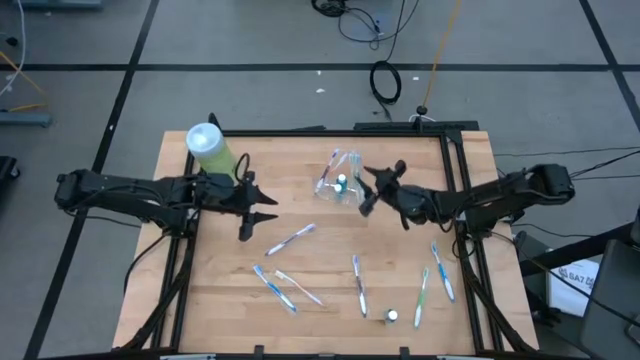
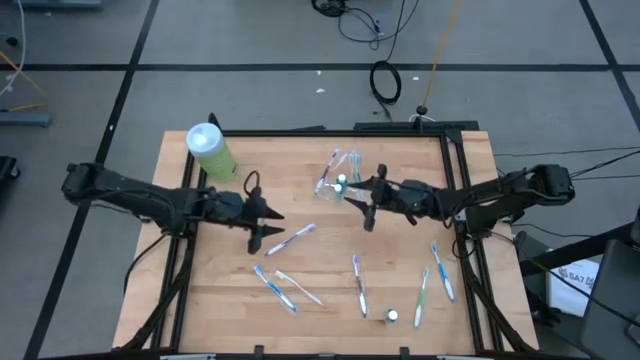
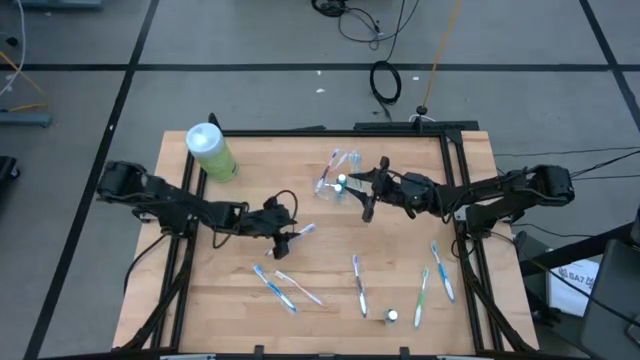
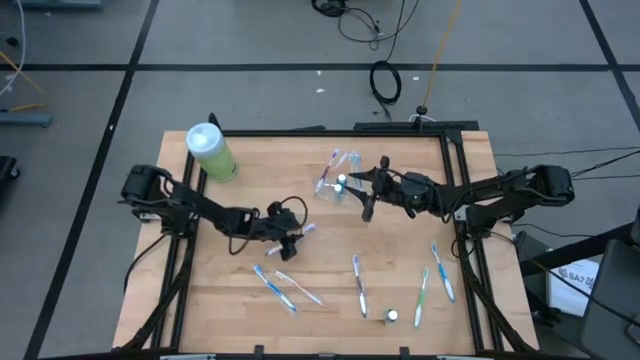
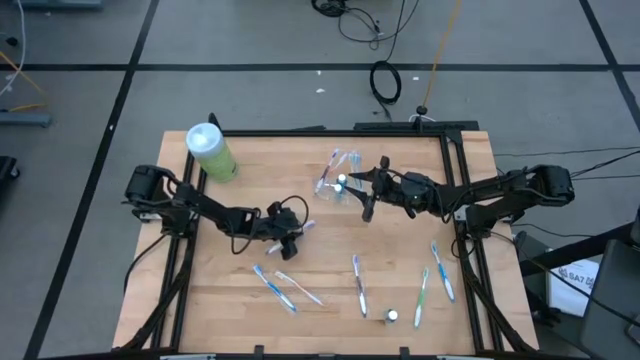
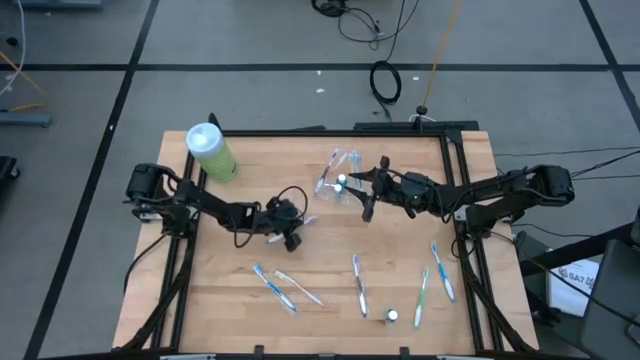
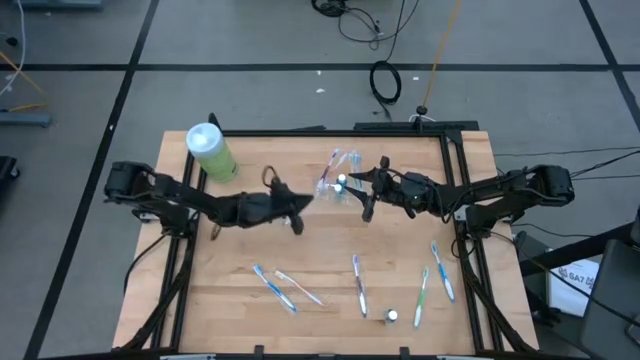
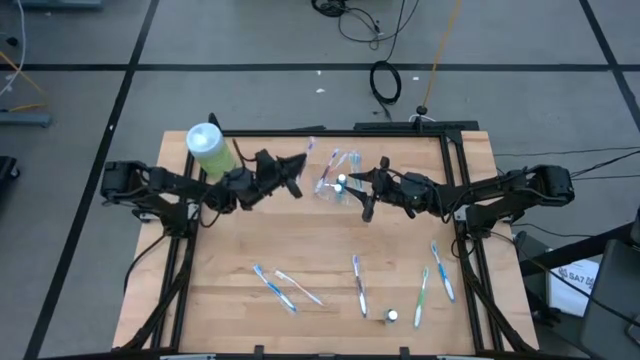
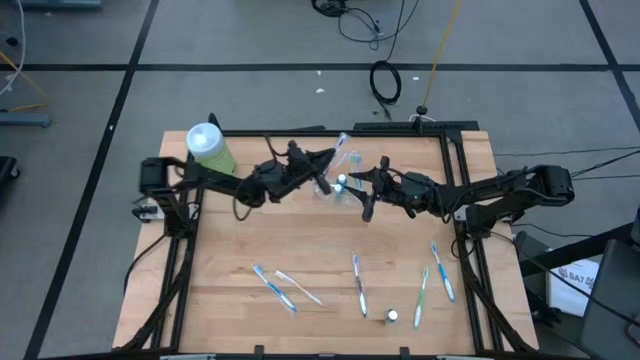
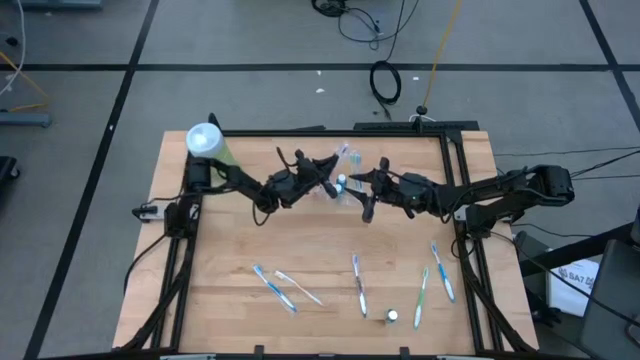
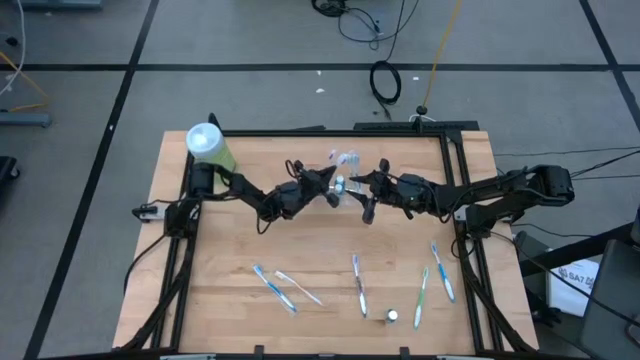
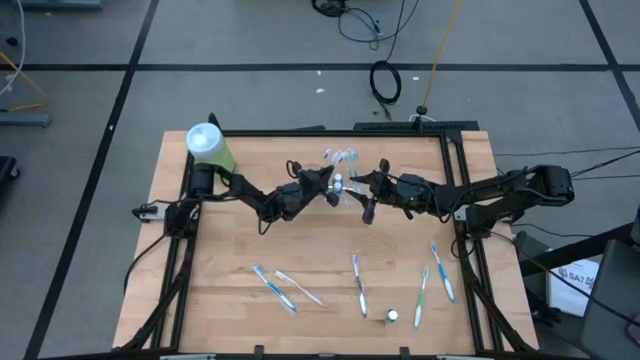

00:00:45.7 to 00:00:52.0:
Task: Pick & Place toothbrushing station
Put the top violet toothbrush into the transparent organizer

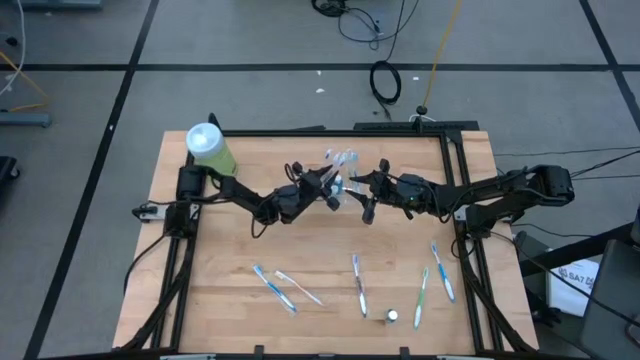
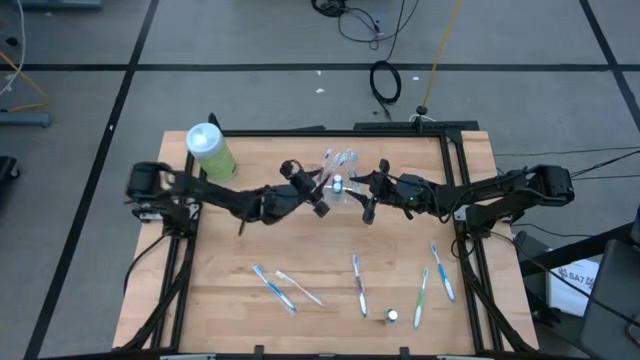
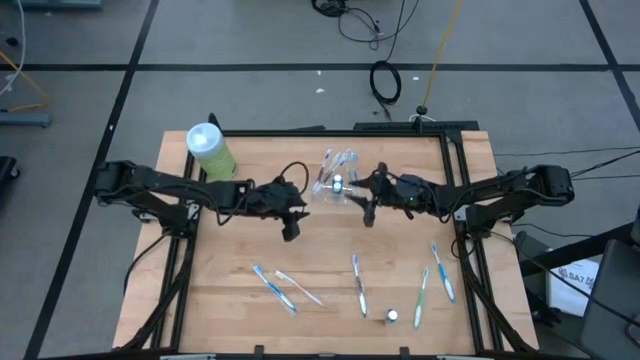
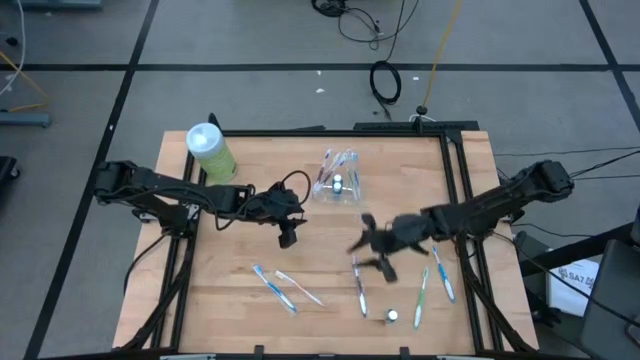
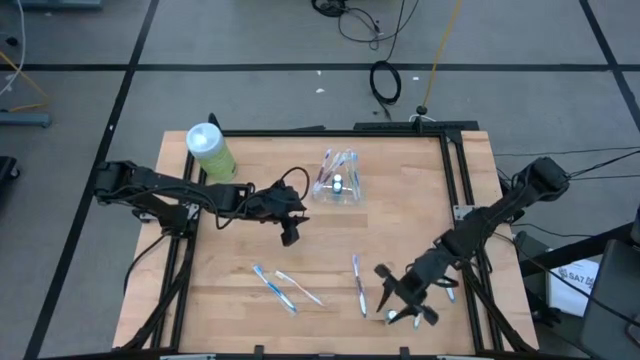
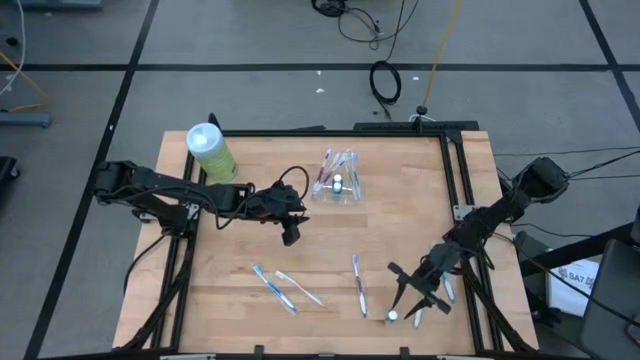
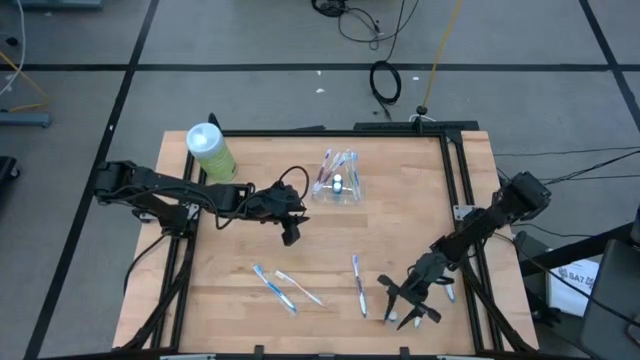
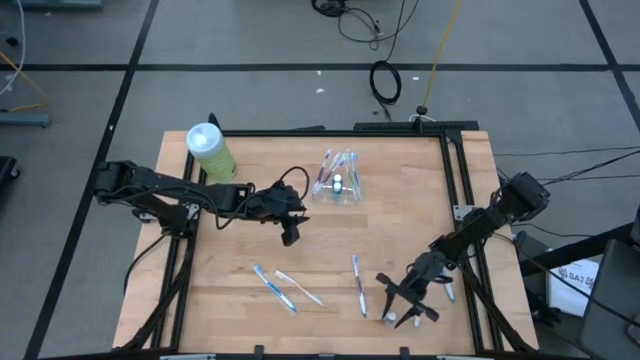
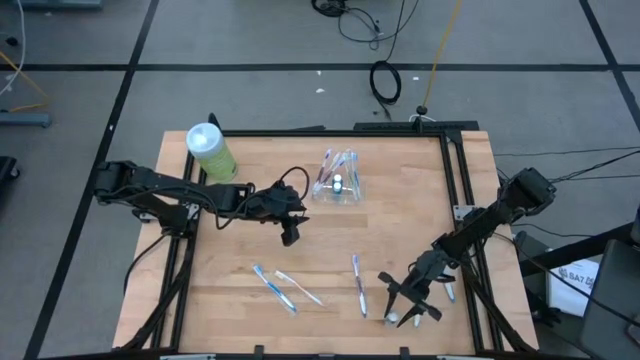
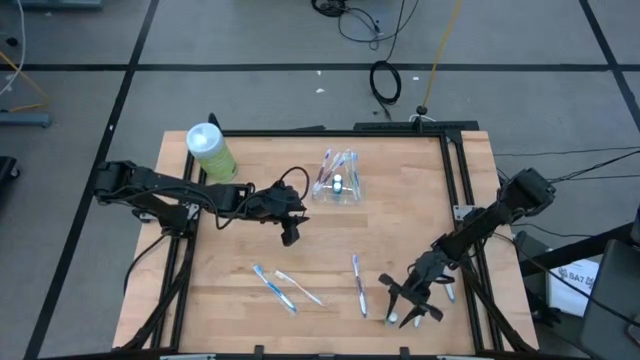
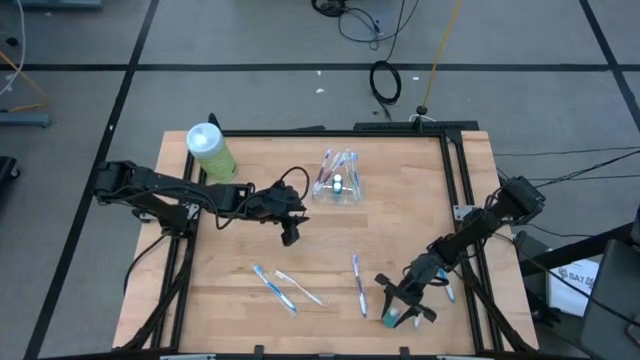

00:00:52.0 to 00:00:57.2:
Put the blue mouthwash into the transparent organizer

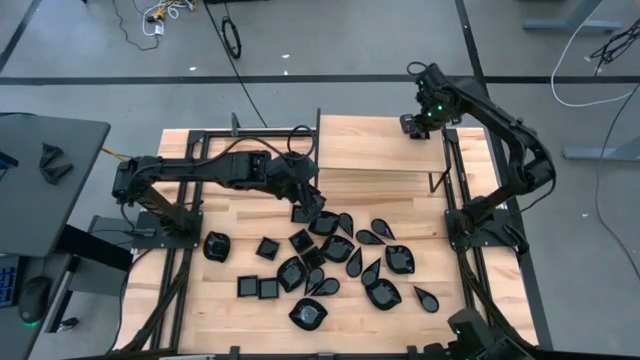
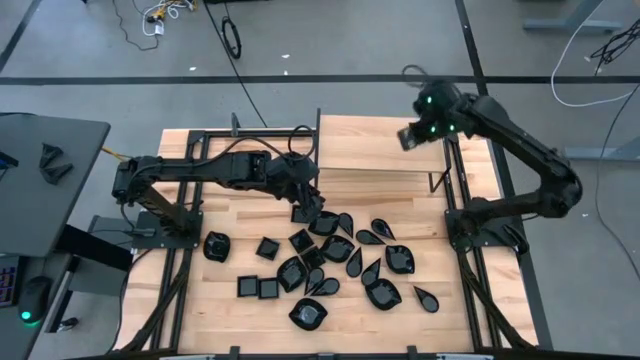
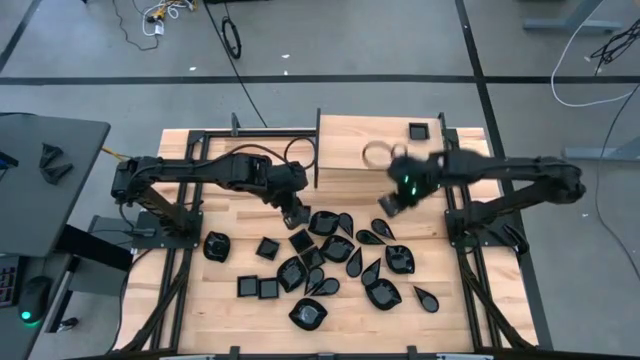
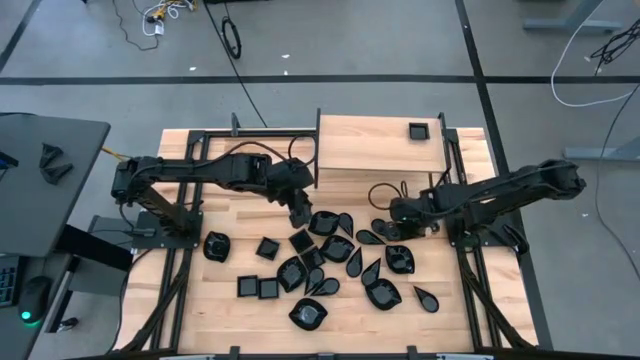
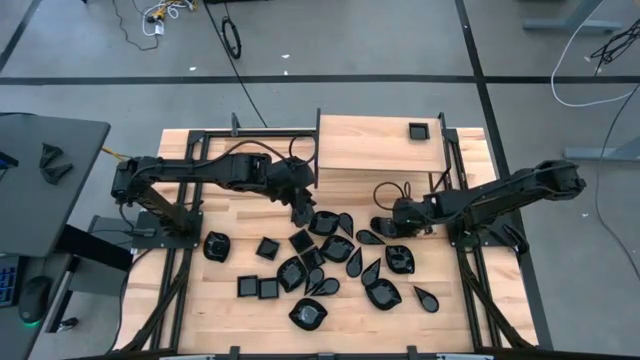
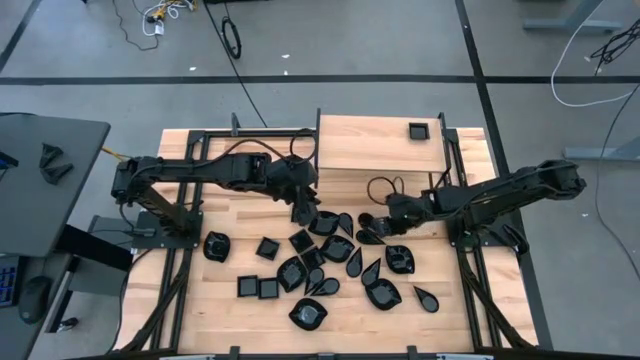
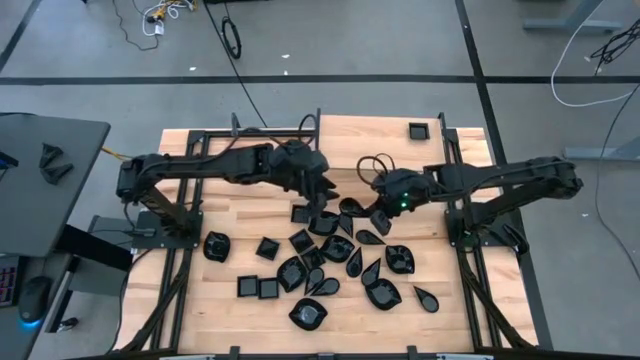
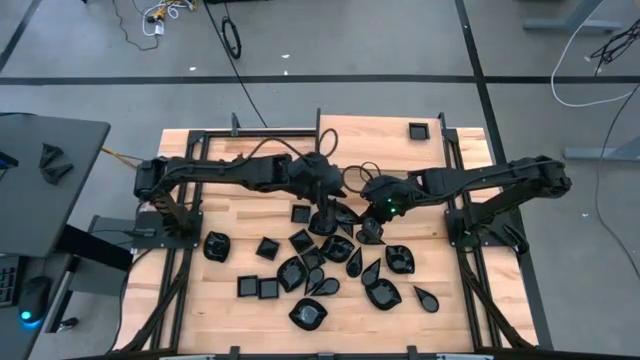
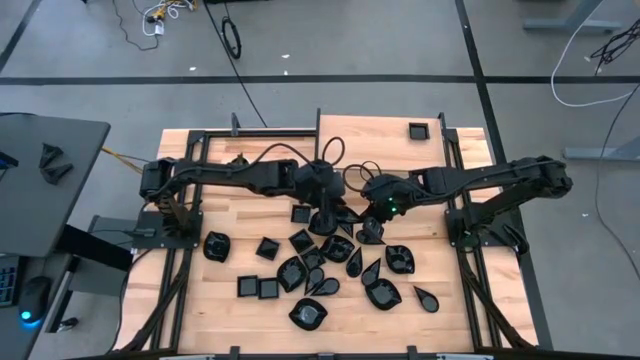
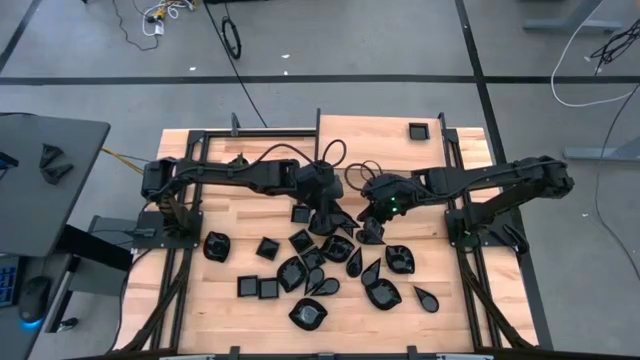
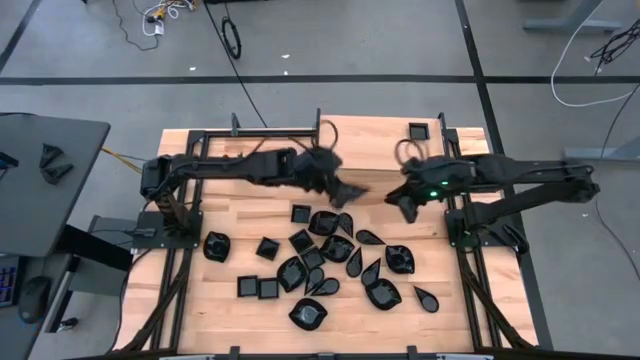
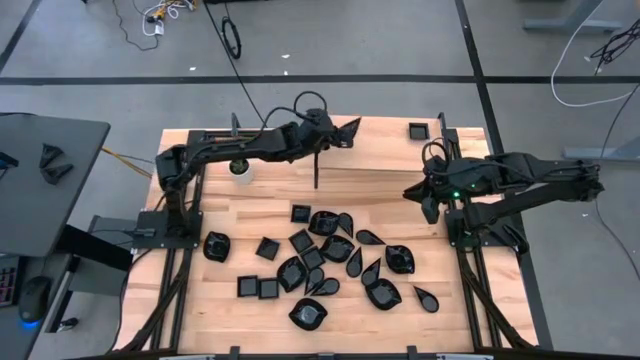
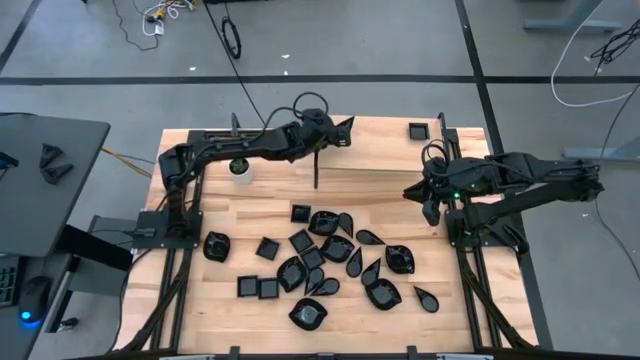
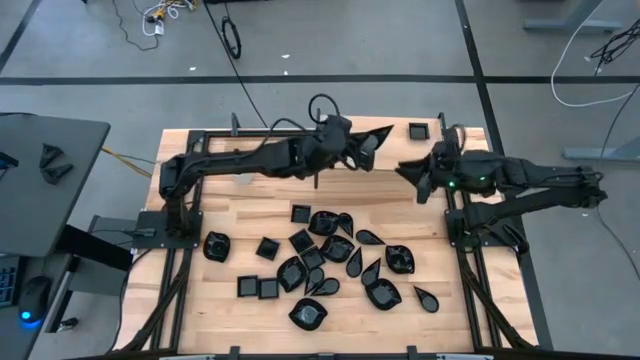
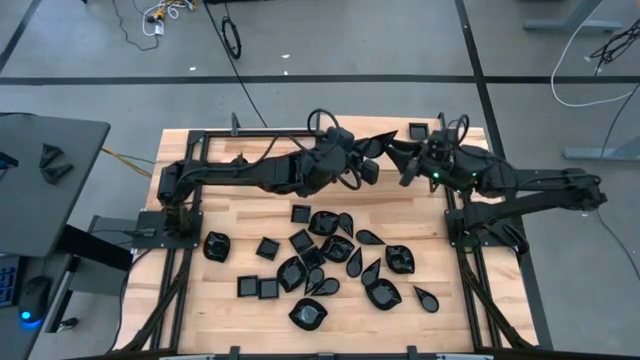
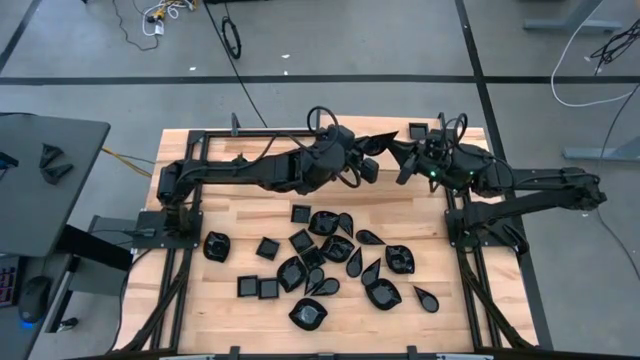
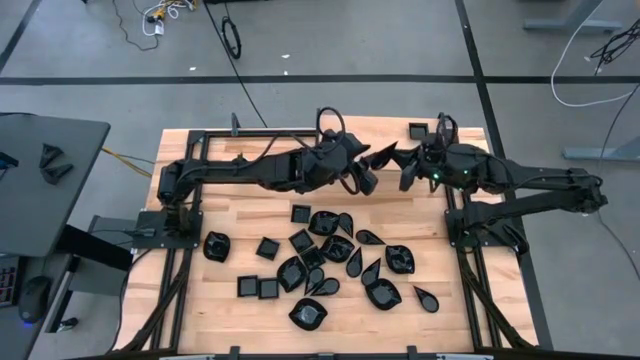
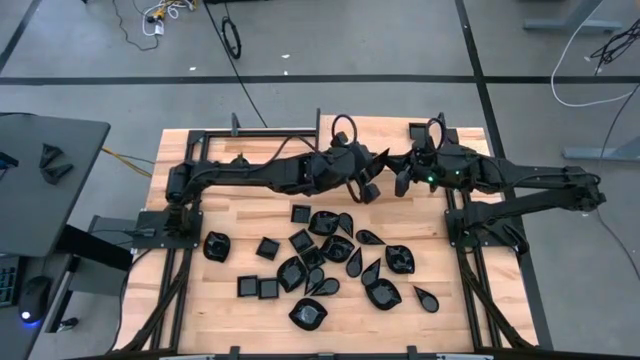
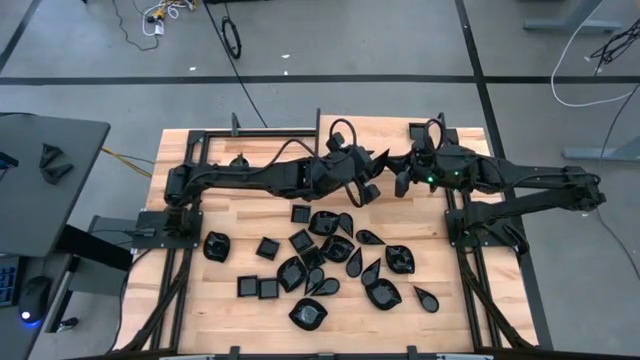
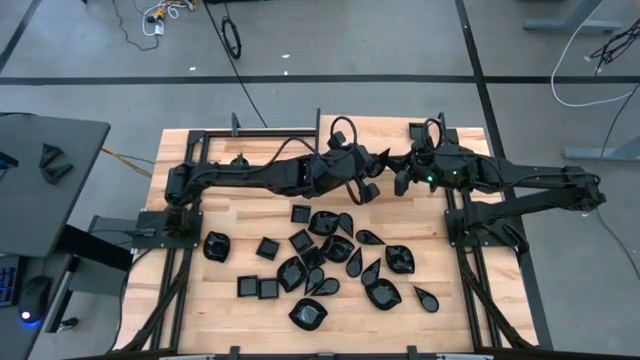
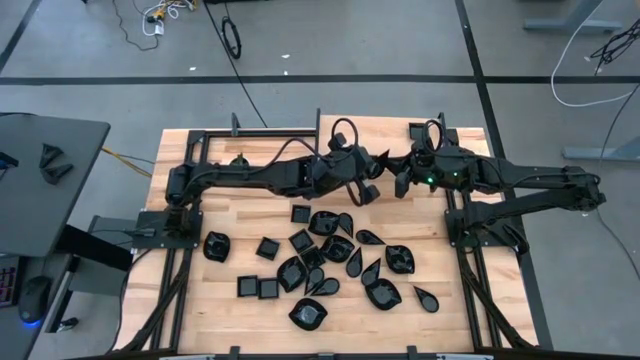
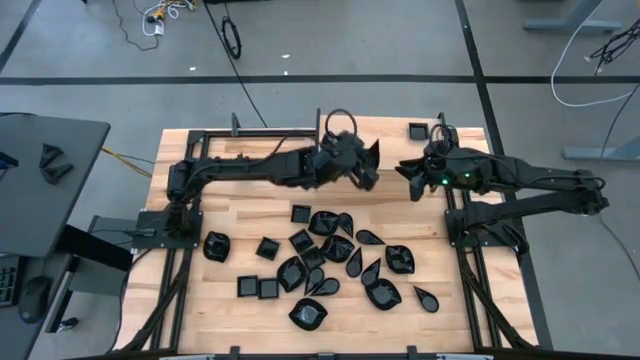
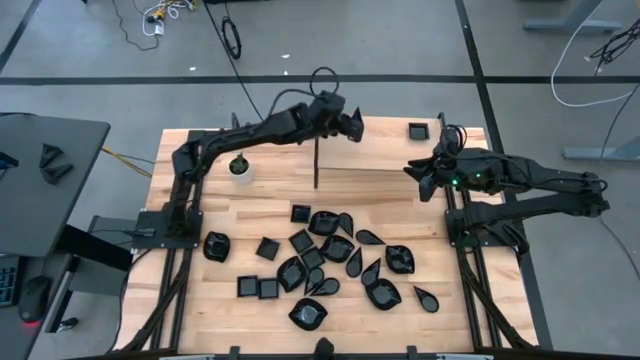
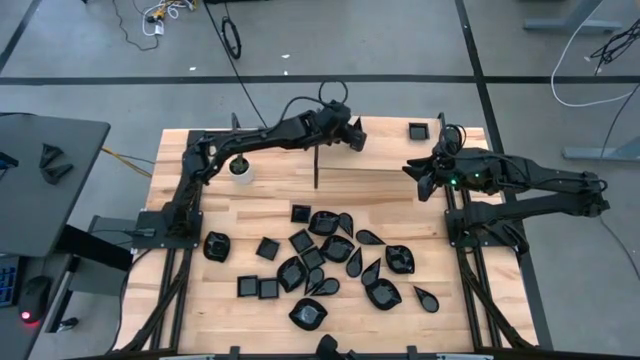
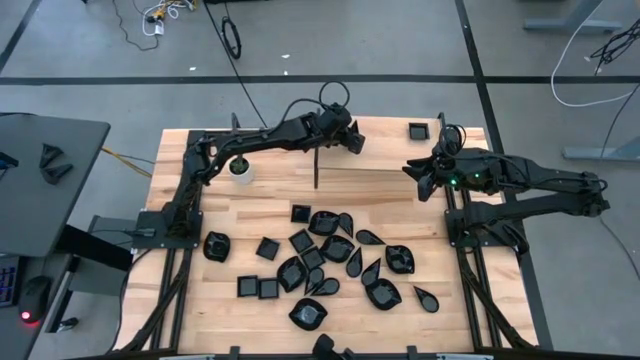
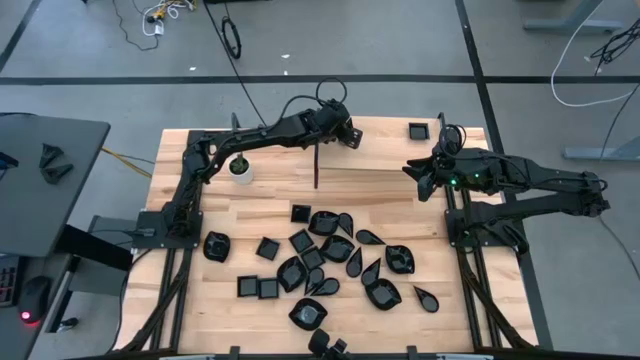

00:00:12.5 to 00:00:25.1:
Task: Pick & Place Mini shaped plates
Put the drop-shaped plate on the shelf
